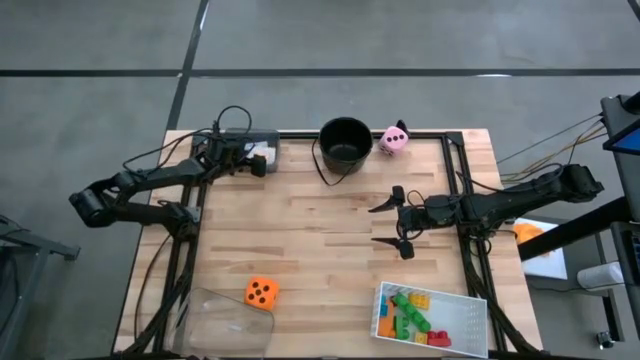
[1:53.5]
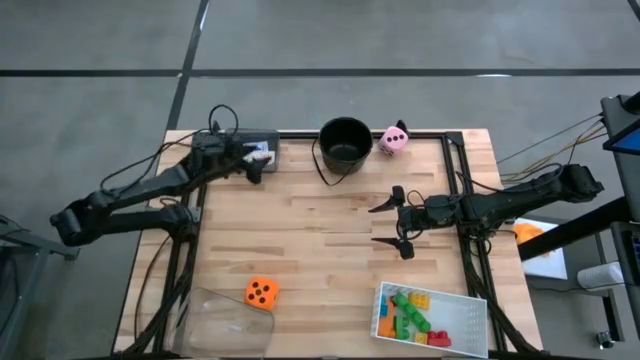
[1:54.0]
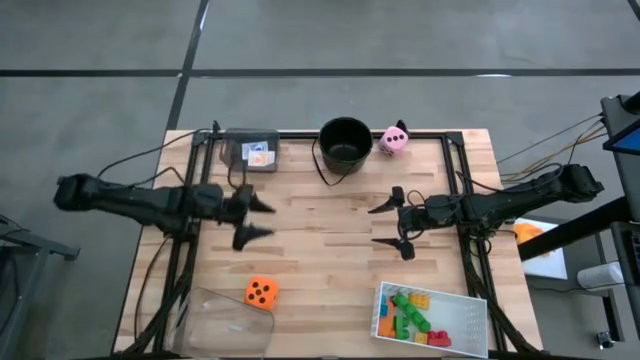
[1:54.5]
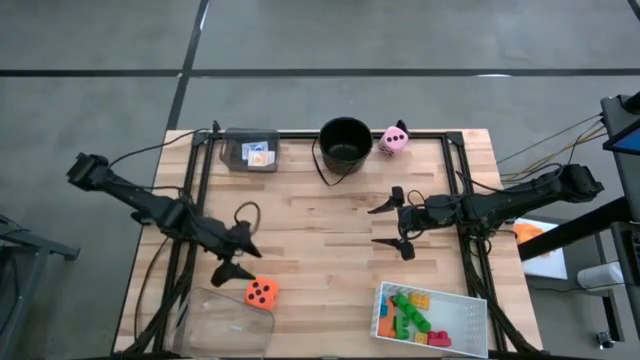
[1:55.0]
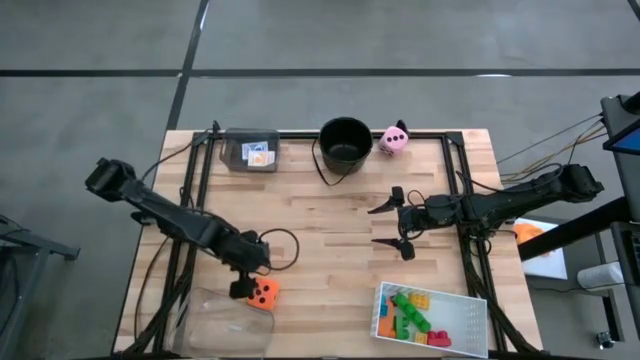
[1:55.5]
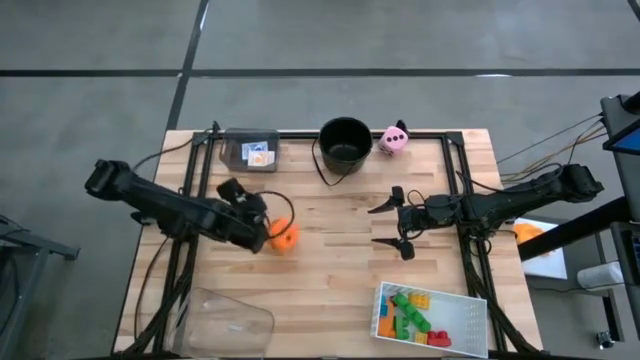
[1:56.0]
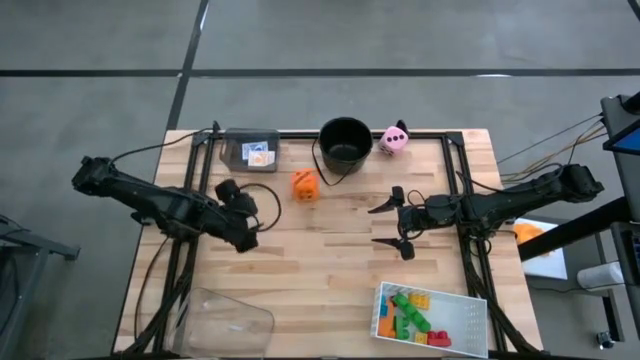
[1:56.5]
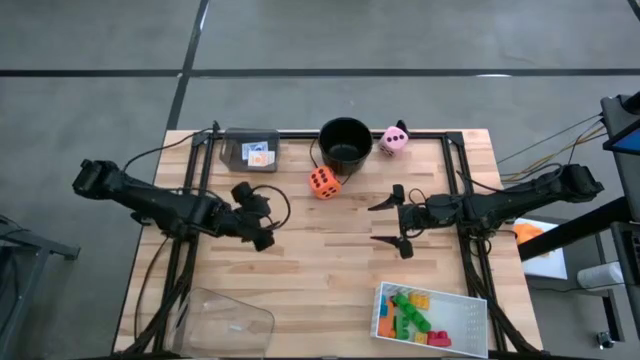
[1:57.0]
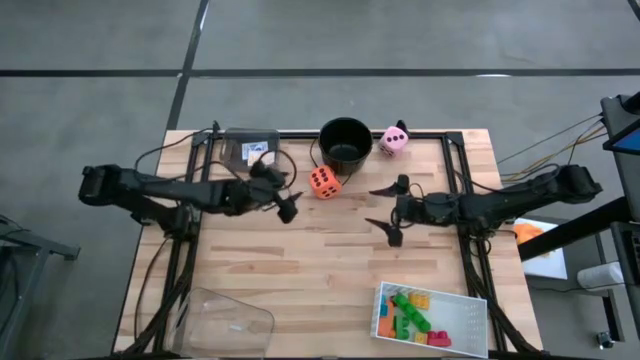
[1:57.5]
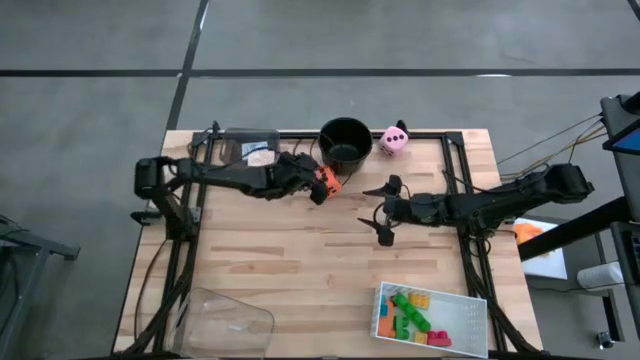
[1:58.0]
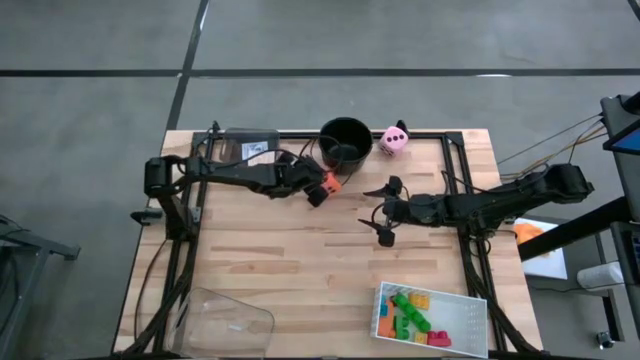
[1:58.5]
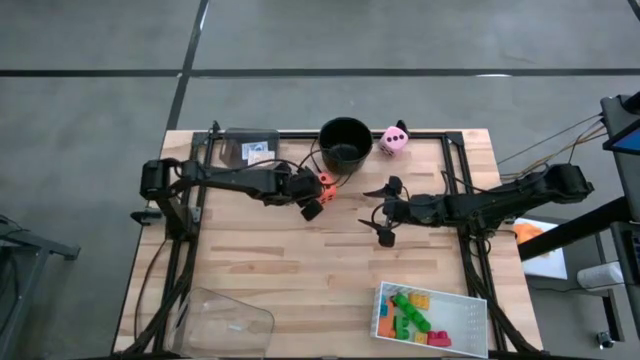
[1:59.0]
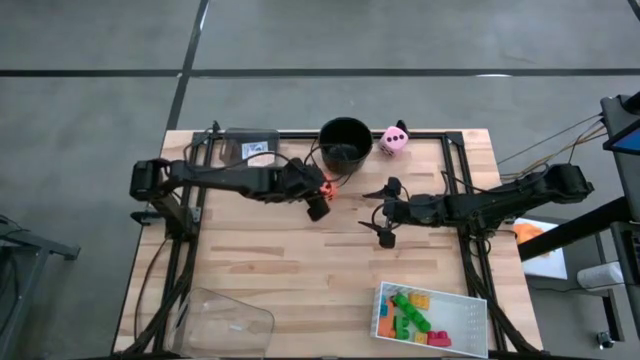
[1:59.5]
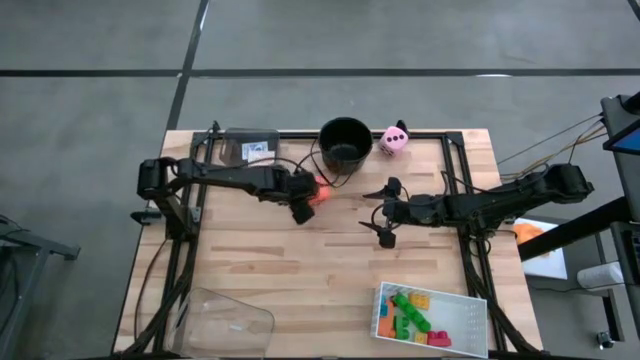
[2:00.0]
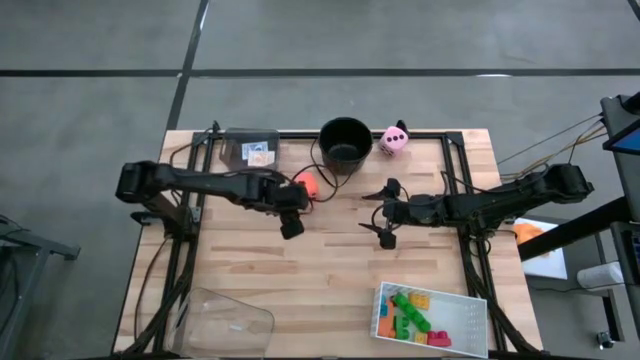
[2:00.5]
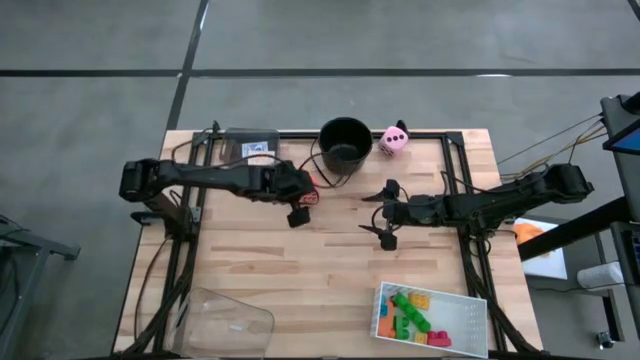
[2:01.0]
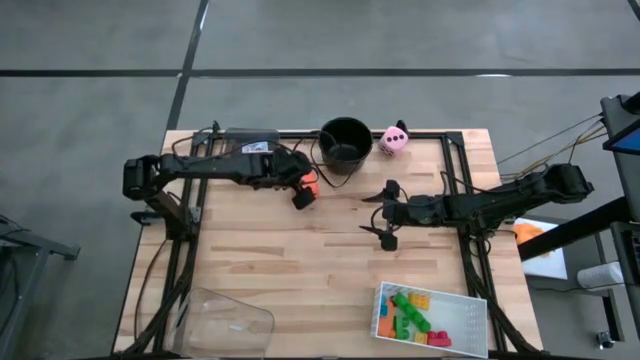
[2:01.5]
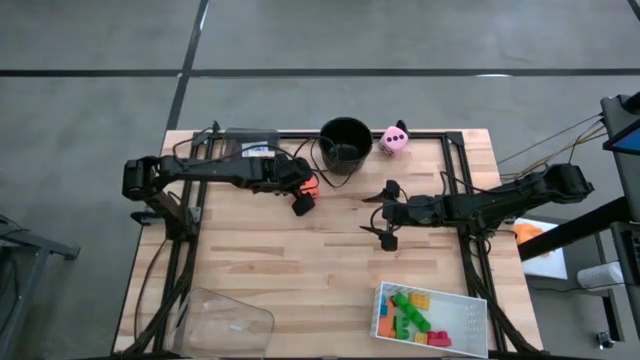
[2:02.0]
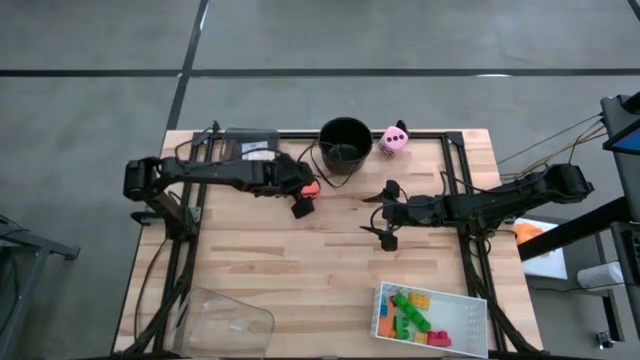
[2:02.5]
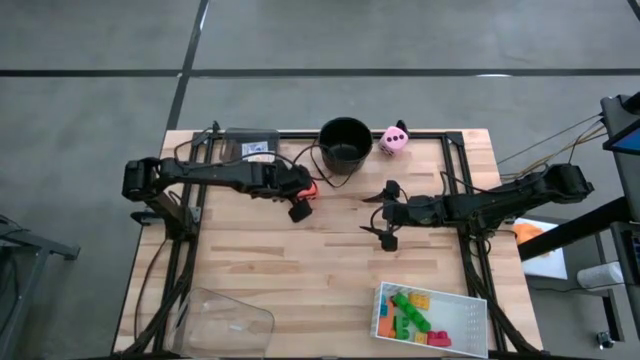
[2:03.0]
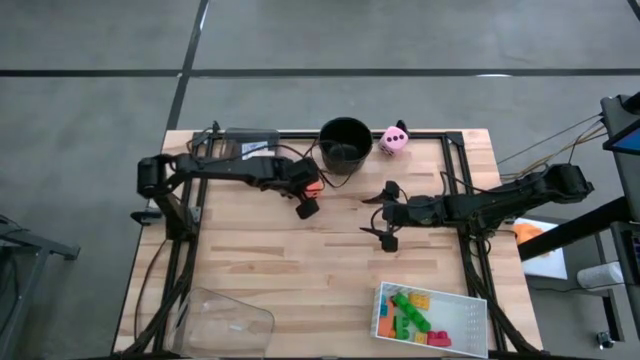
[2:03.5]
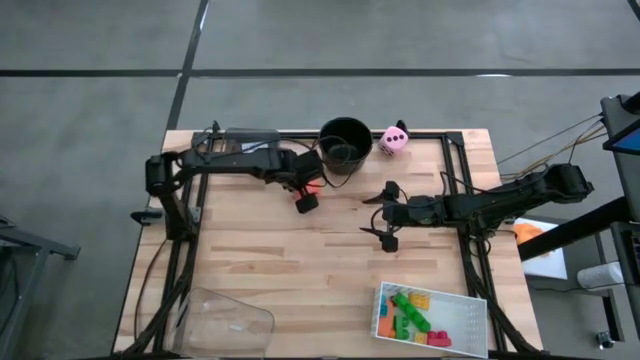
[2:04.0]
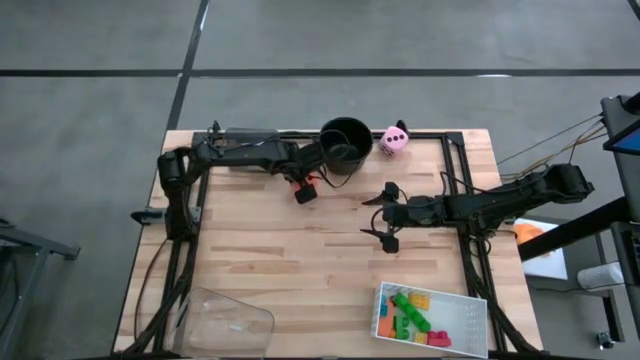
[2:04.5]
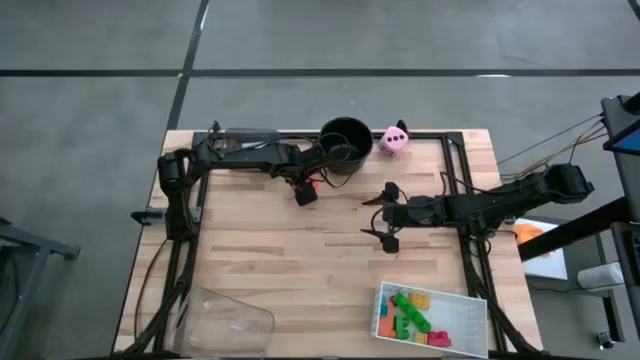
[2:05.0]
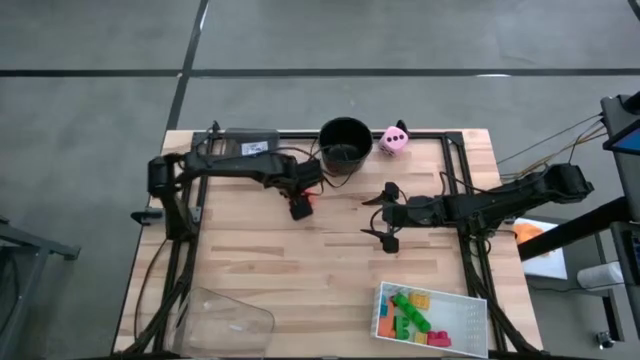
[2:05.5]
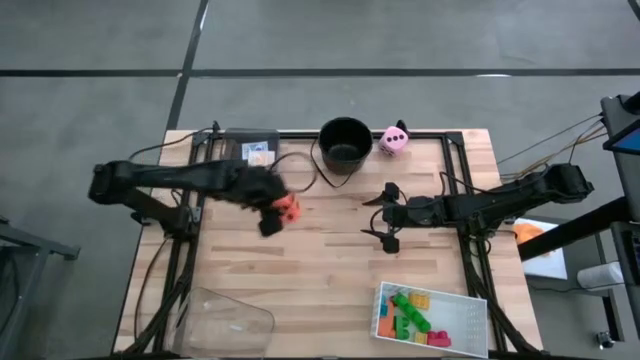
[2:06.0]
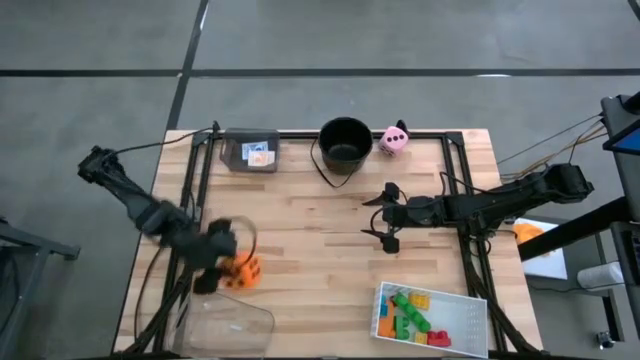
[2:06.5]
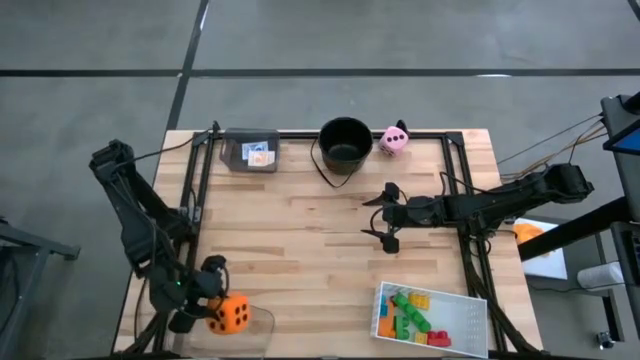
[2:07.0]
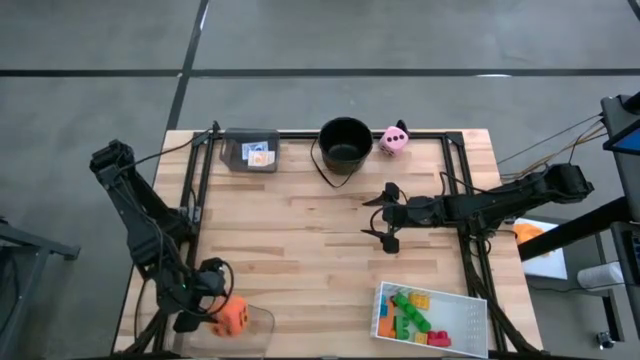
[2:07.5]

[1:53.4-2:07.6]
Task: Pick & Place Toys
Put the orange dice into the transparent bin

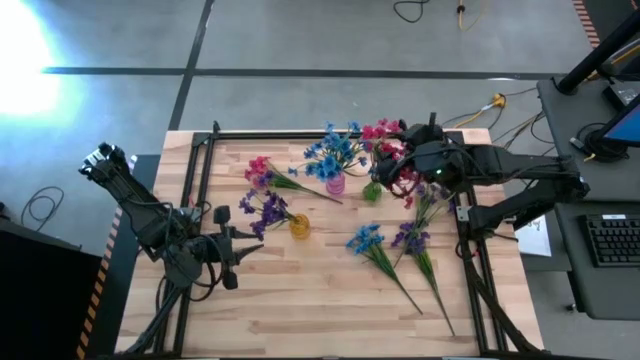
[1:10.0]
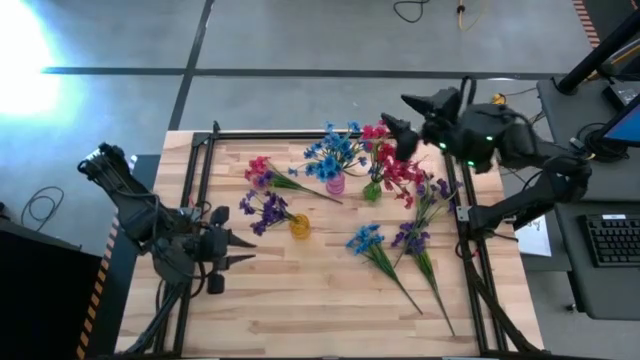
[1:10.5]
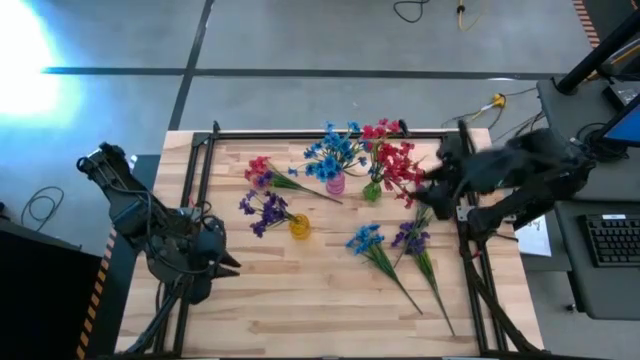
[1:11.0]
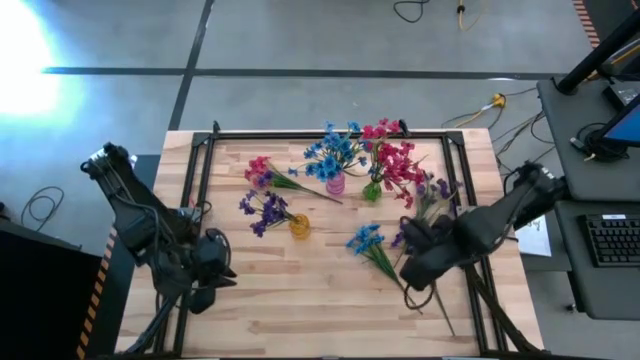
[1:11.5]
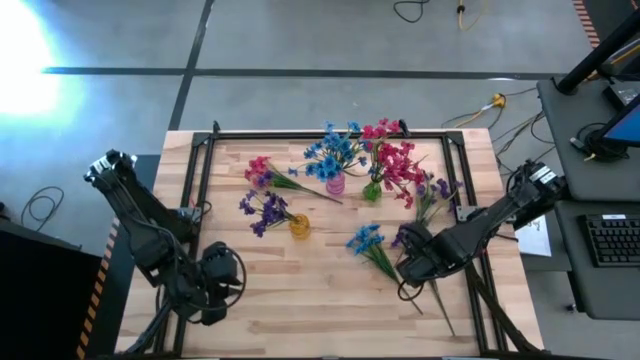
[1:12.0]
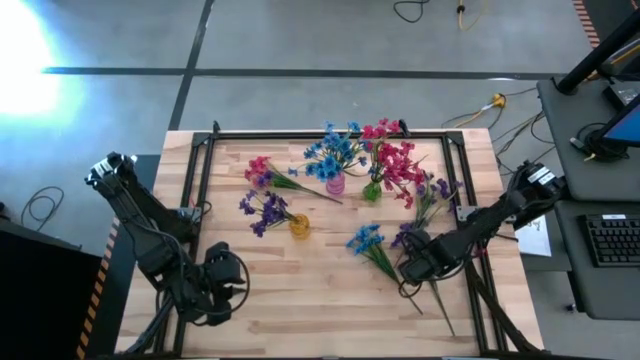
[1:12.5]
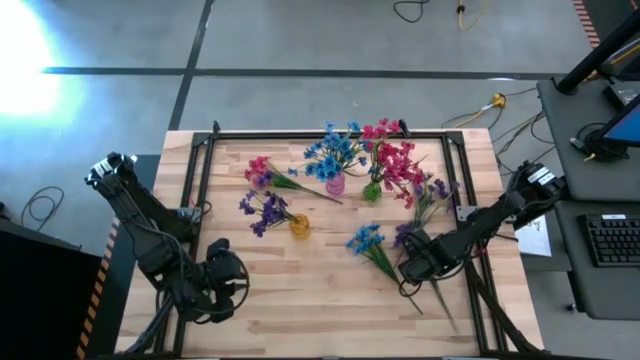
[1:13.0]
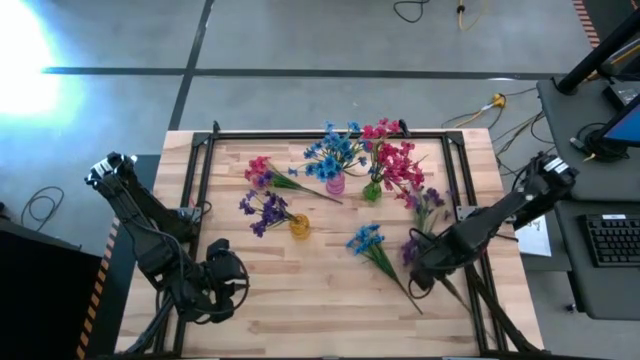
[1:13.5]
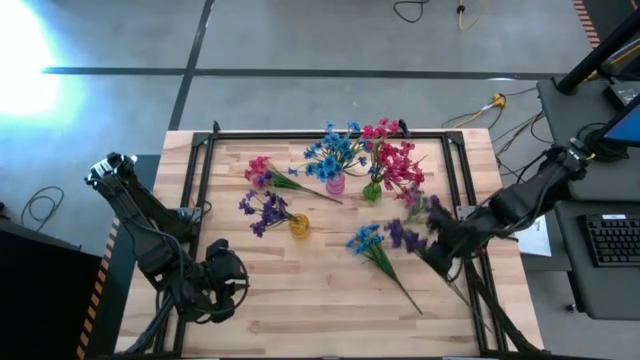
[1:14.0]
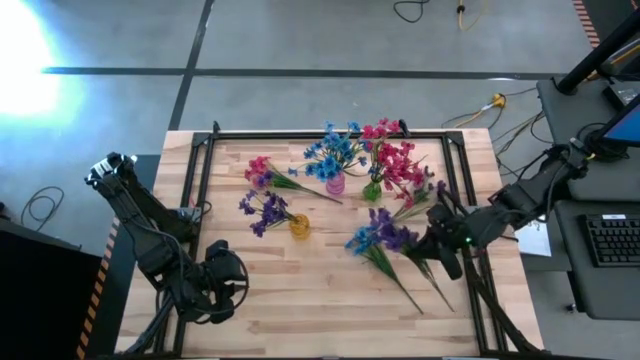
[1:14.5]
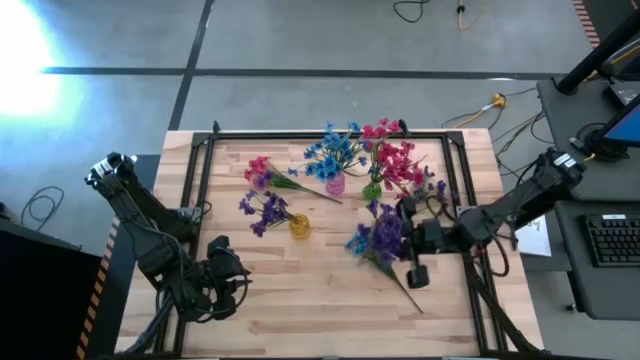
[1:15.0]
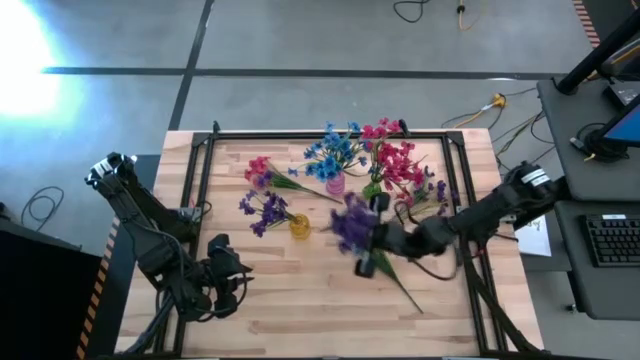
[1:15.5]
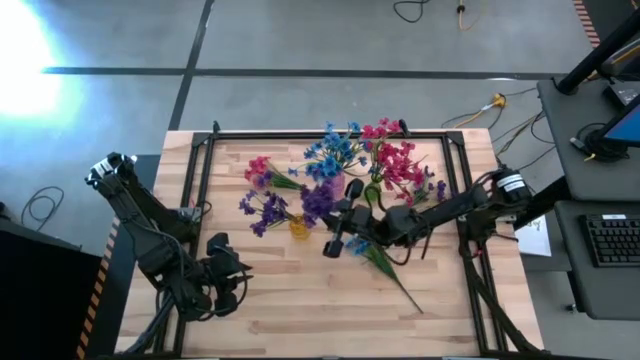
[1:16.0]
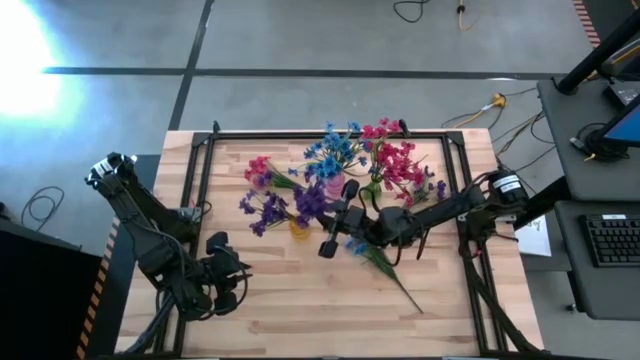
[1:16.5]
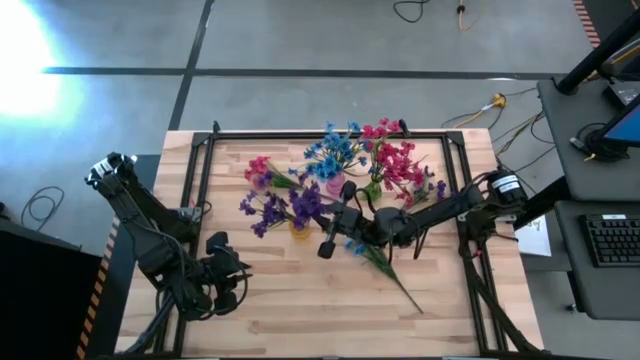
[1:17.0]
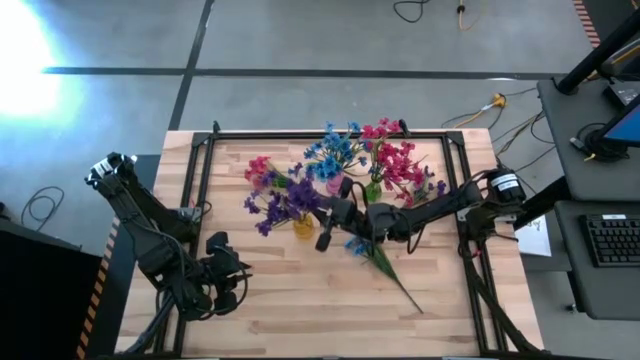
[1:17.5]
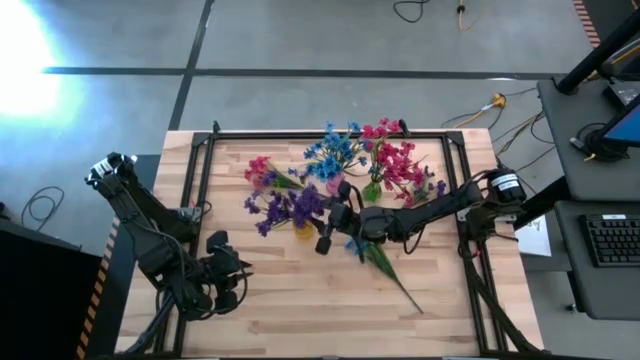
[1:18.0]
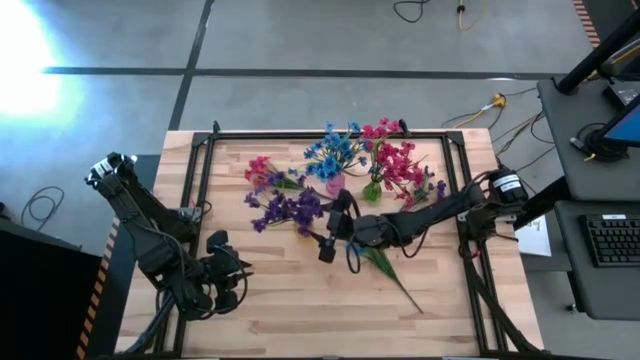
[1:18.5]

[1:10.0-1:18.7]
Task: Sort flowers into vase by color
Put the bottom violet flowers into the yellow vase
